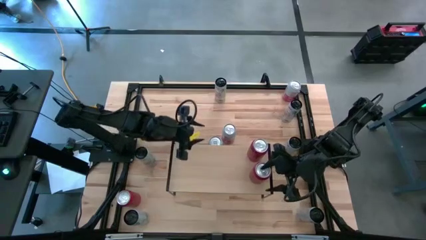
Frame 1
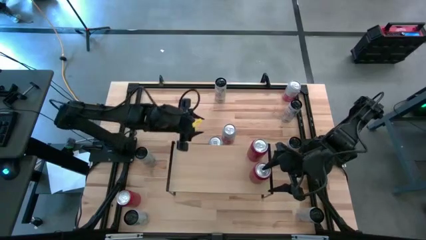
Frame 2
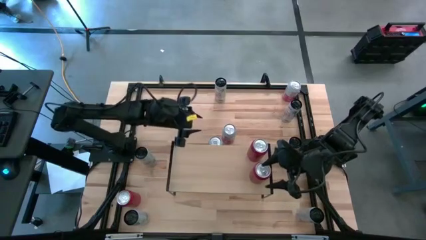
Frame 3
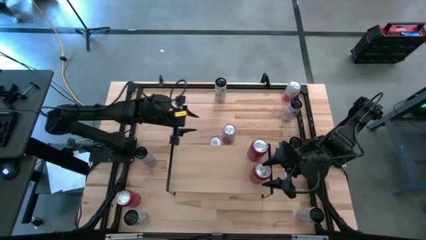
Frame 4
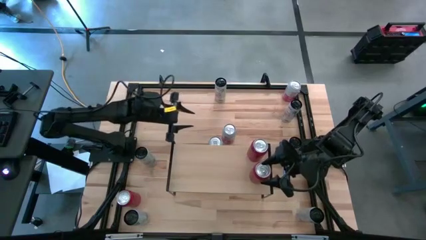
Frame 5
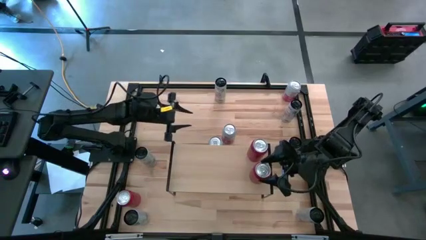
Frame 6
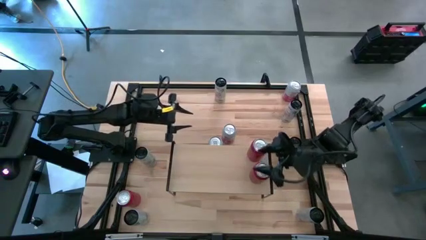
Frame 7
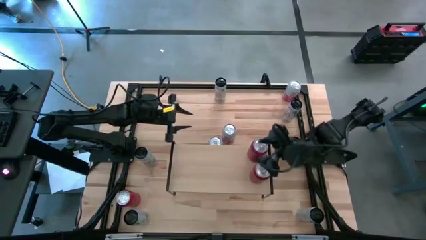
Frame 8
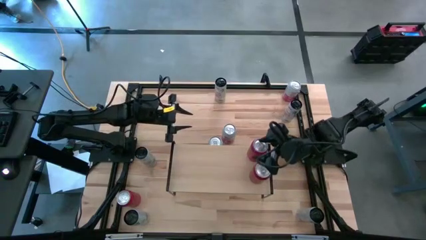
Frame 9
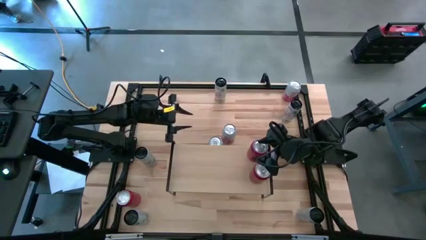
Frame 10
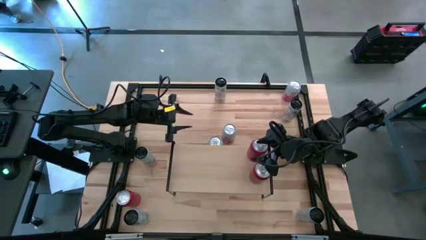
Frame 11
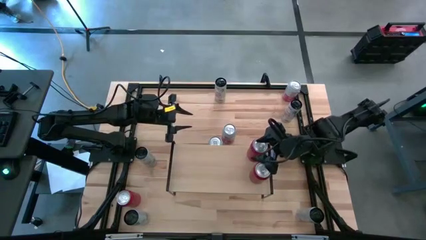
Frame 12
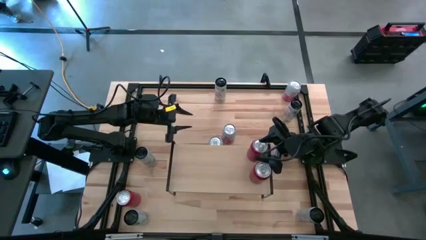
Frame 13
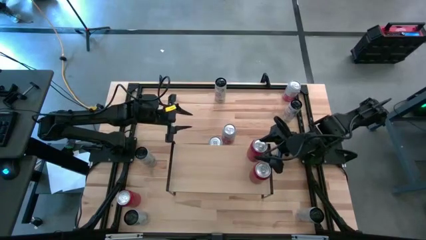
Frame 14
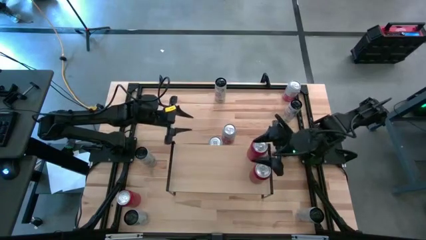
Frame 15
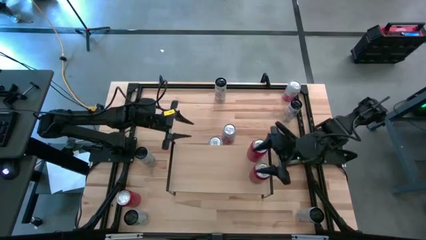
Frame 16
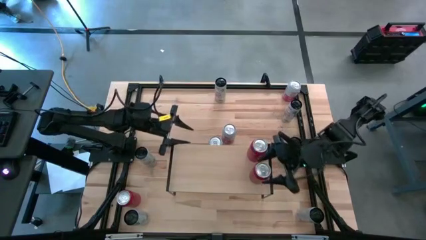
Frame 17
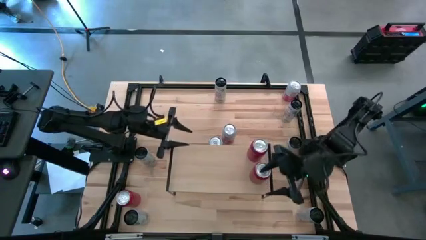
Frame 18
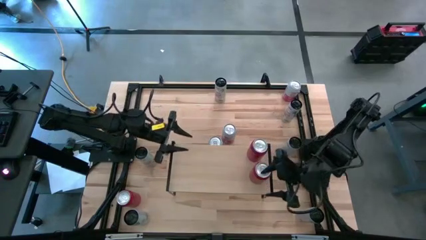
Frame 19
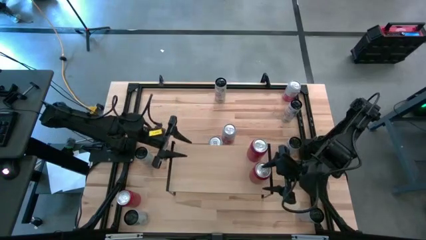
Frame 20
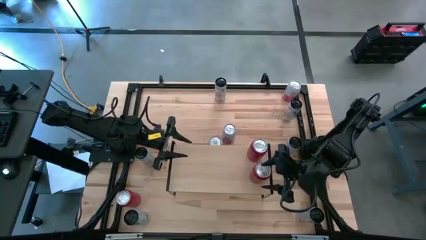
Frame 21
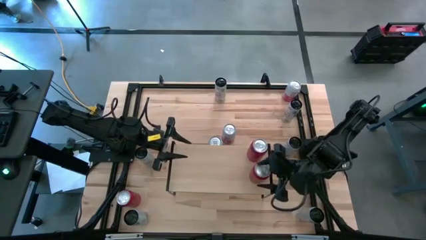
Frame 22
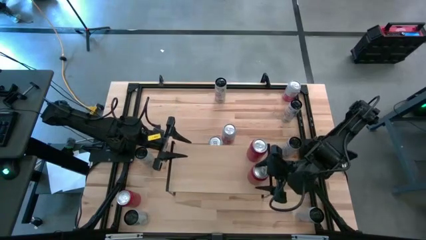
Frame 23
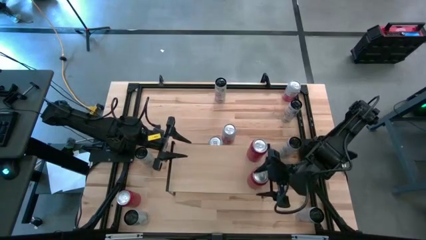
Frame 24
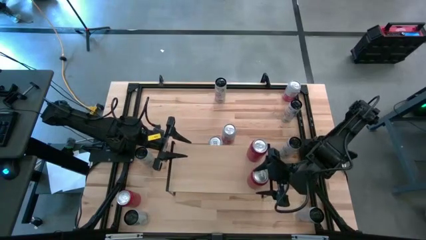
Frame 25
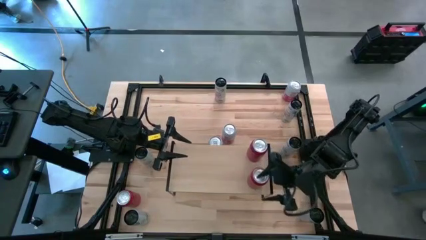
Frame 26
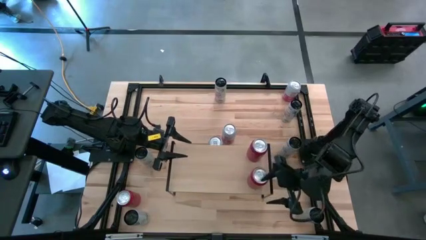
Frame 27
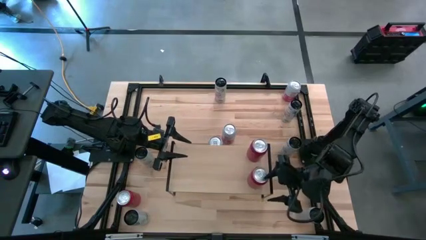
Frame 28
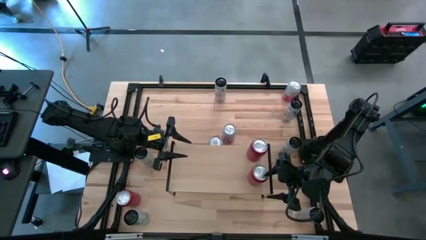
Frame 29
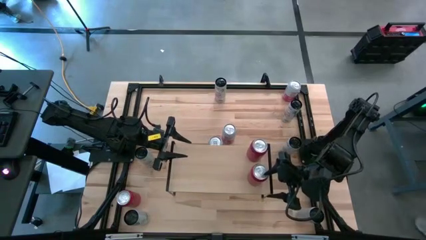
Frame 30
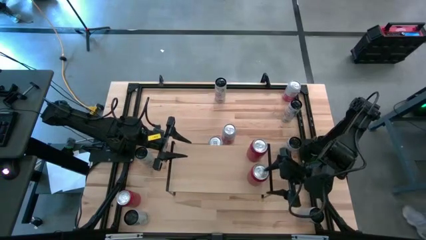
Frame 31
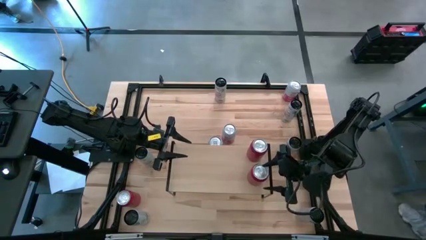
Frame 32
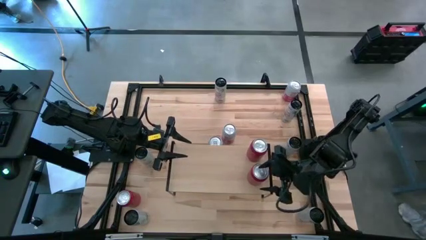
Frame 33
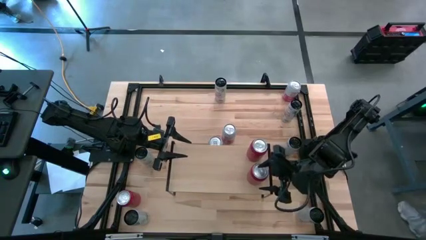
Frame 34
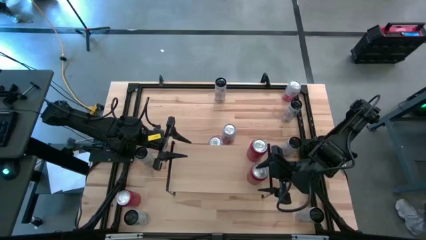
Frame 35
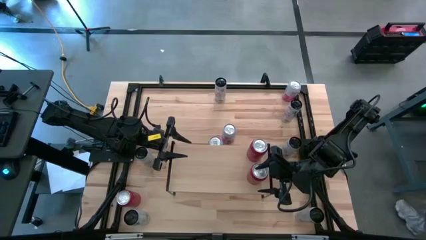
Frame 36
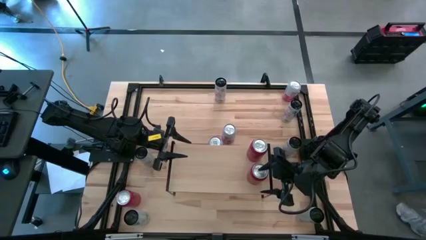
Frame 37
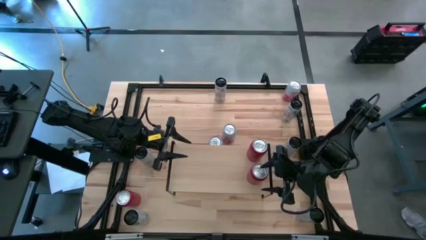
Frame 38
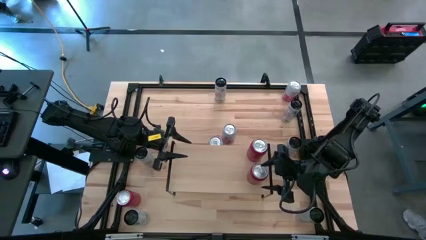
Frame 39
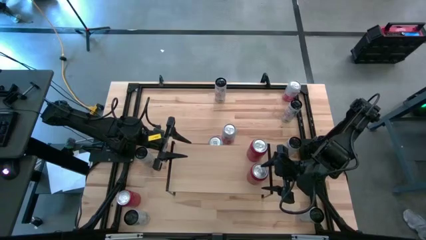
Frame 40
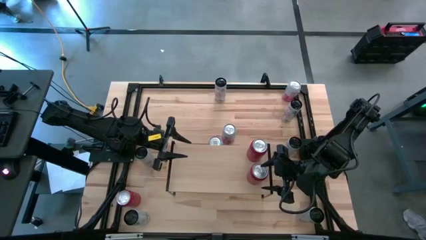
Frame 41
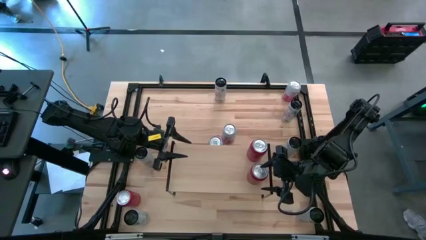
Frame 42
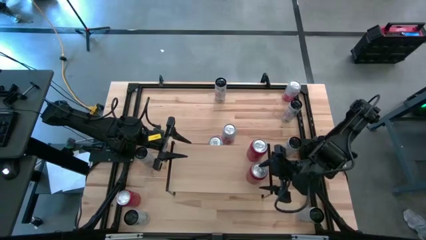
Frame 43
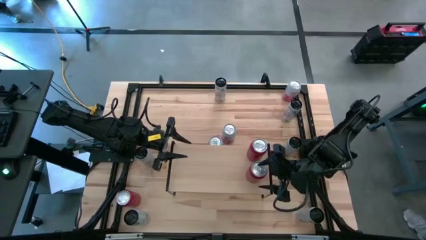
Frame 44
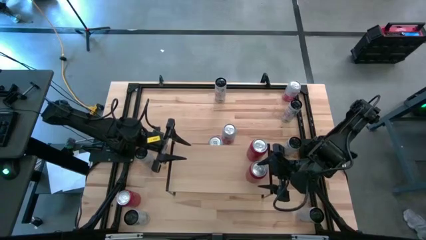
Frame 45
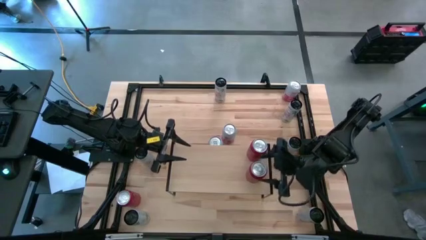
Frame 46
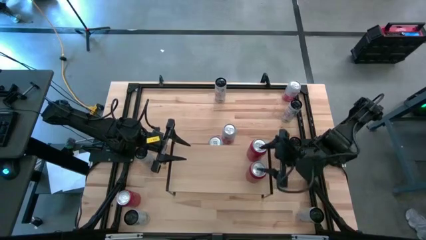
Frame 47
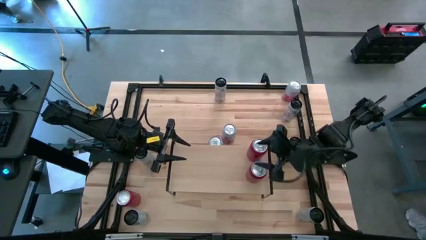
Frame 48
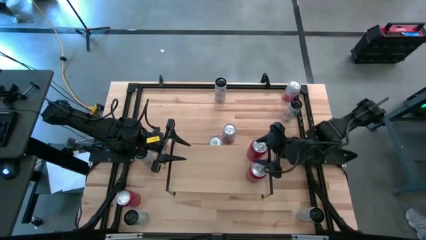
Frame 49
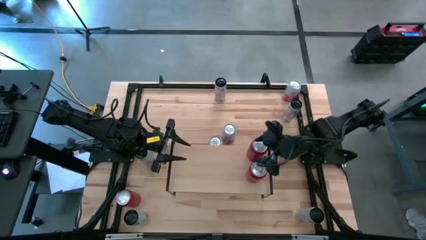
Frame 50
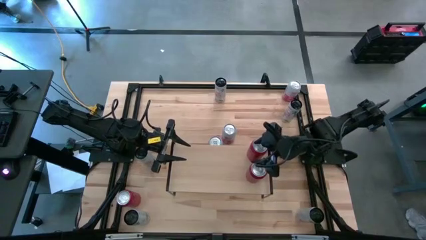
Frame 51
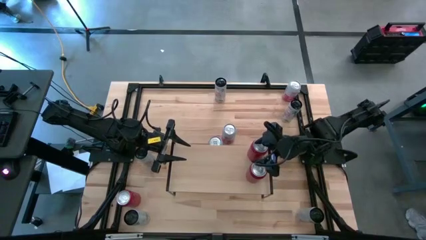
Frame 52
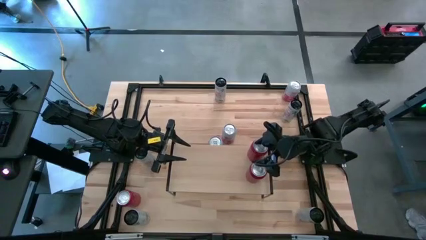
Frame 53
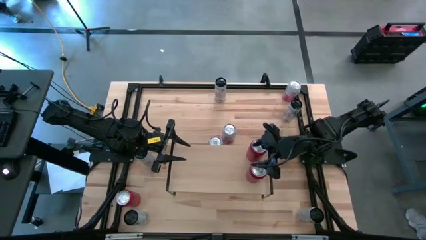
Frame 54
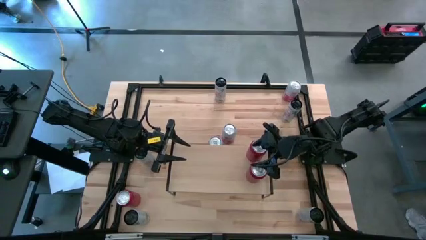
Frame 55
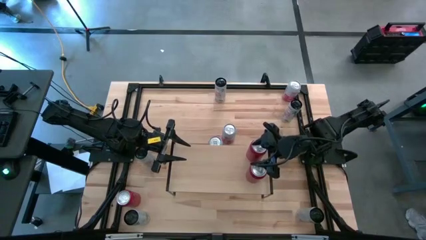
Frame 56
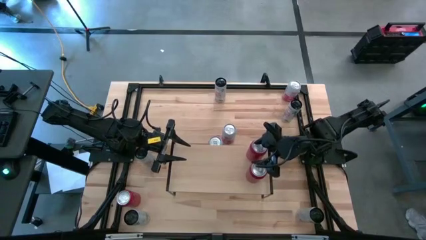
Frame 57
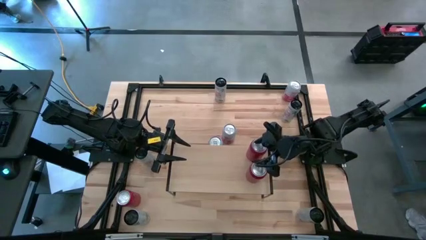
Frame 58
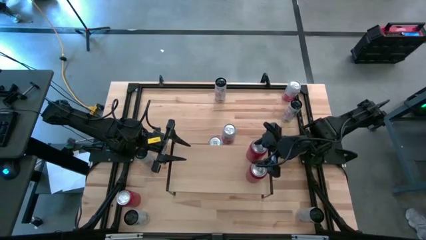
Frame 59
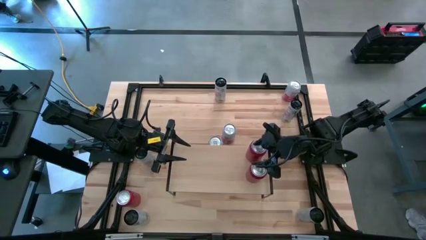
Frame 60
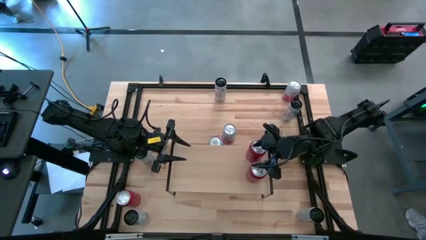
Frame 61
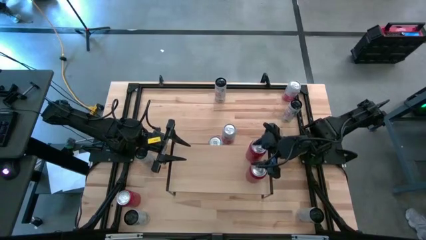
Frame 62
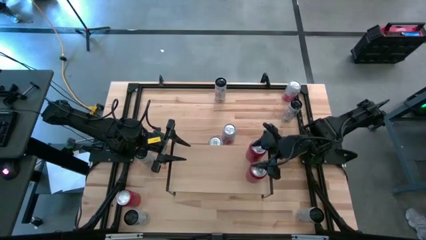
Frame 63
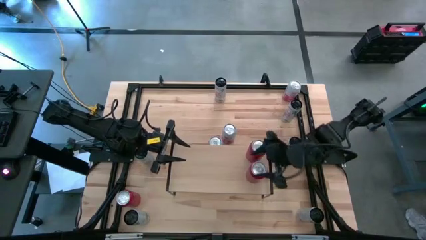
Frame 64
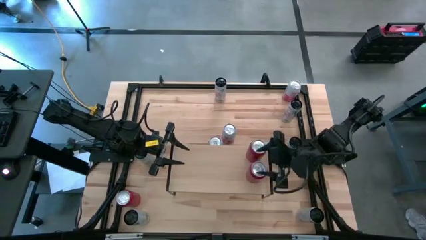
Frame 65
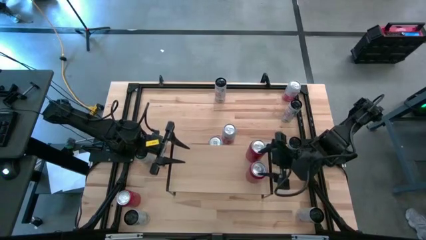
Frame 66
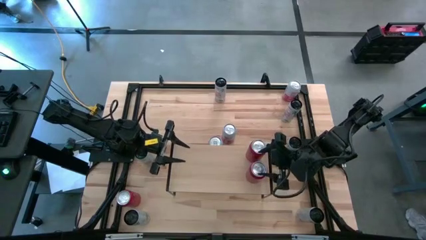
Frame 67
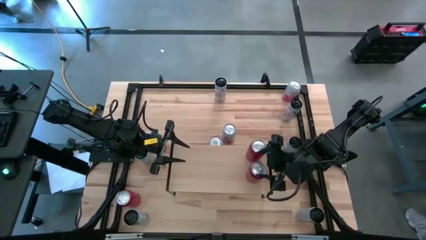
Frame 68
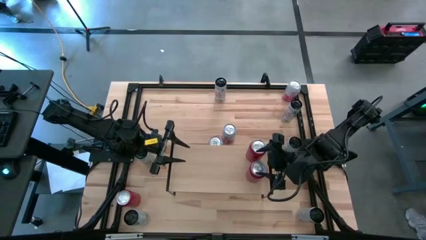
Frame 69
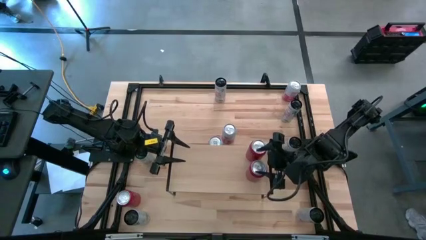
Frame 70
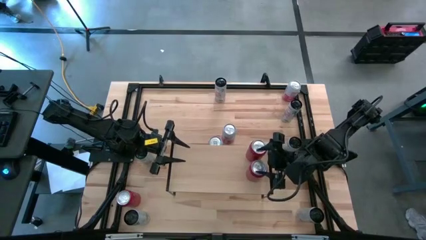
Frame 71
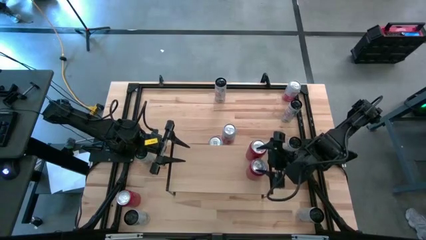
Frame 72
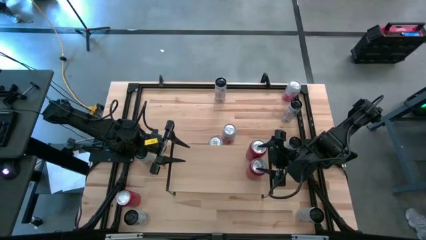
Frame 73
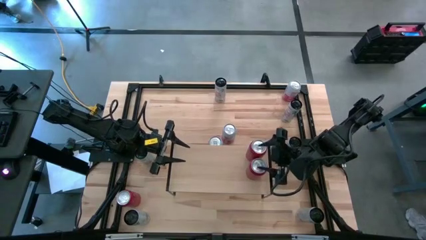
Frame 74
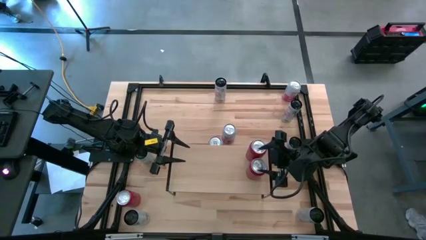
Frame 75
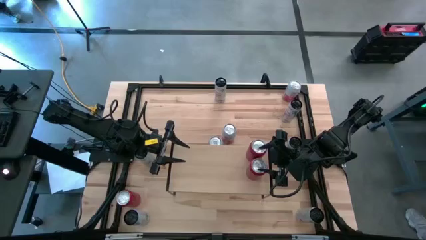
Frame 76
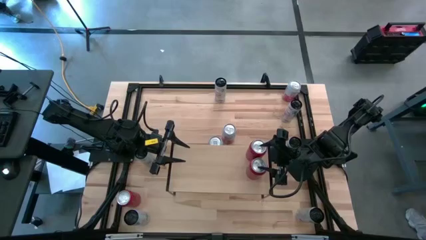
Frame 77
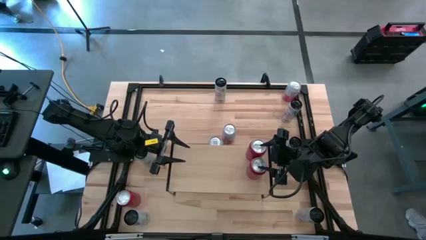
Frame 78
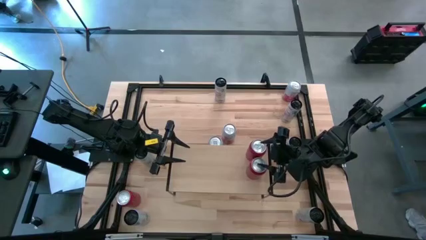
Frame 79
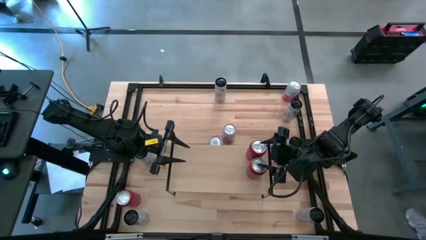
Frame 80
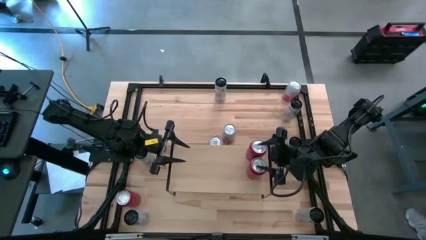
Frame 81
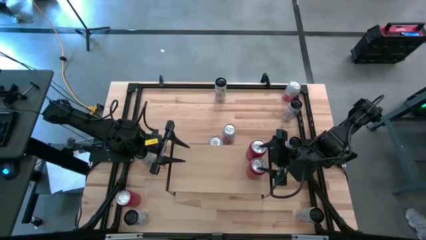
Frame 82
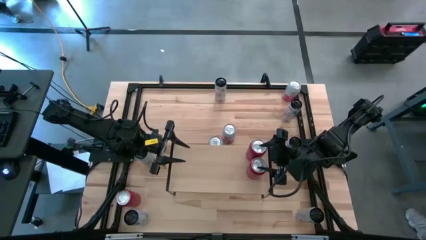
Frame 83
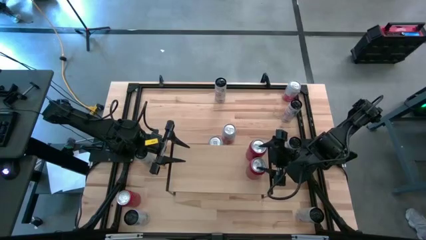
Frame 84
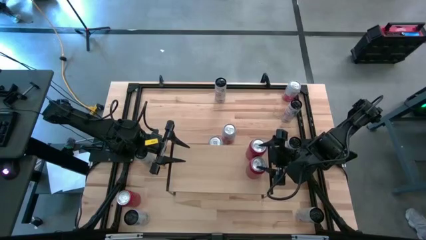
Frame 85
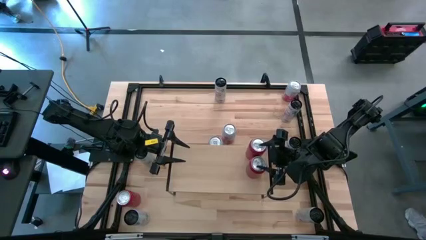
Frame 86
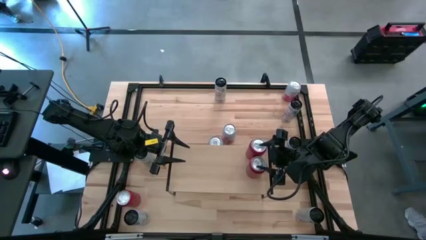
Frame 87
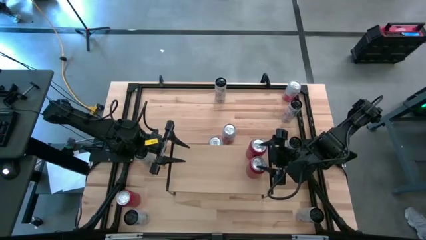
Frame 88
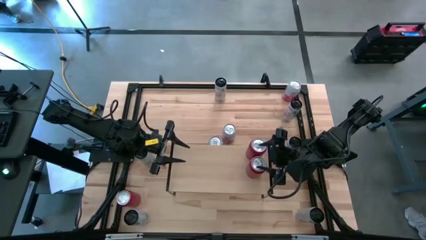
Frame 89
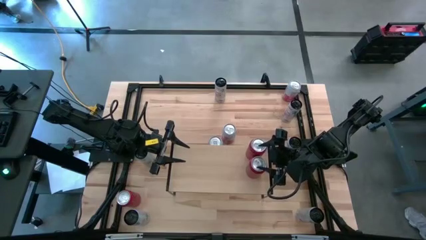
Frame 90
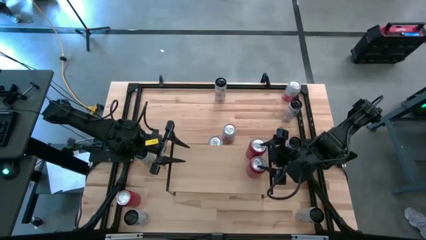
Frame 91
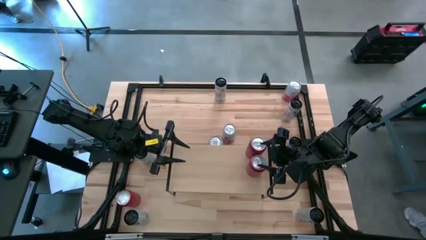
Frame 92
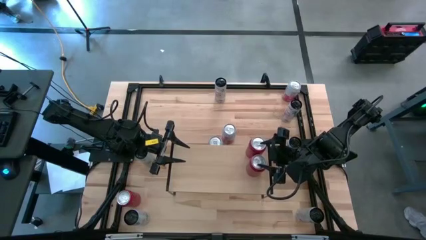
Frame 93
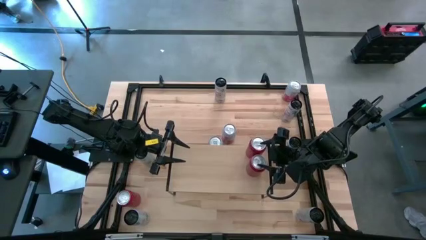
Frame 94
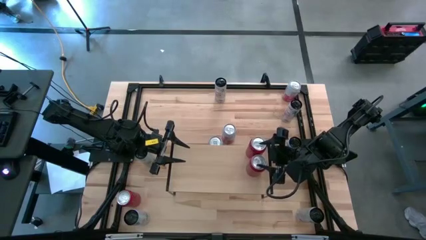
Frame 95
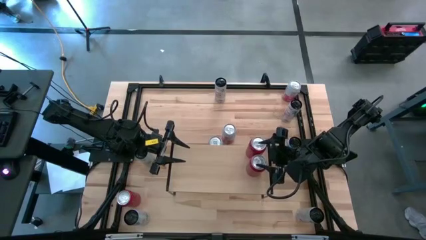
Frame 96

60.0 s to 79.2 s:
Task: Place canned beverage on shelf
Adjust the red-black soda cans on the shelf
